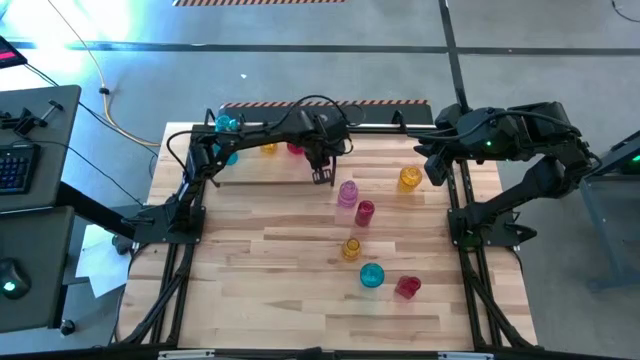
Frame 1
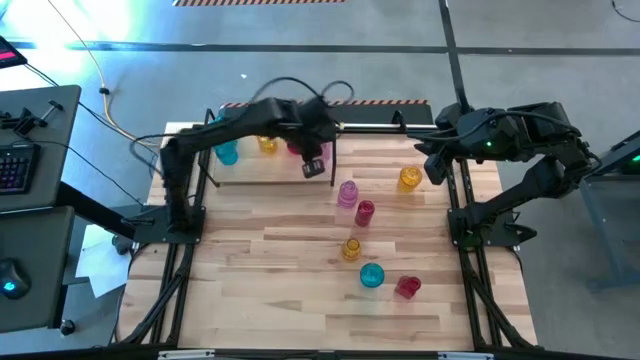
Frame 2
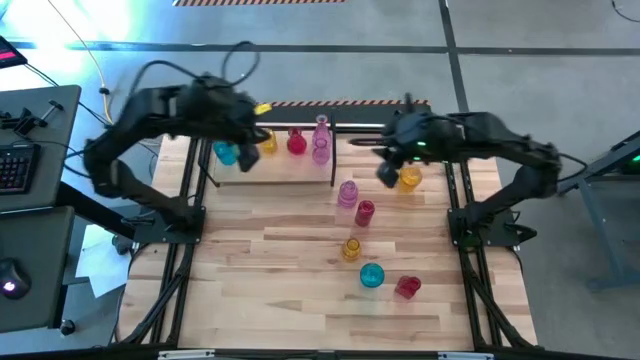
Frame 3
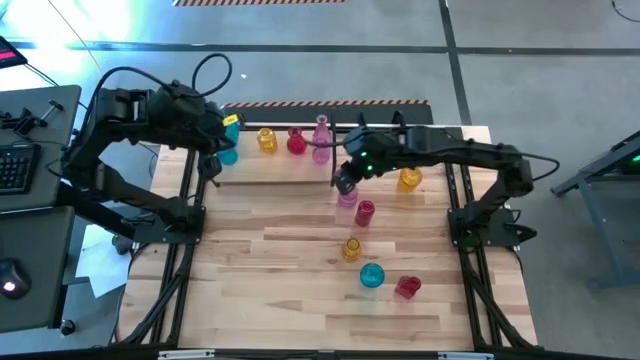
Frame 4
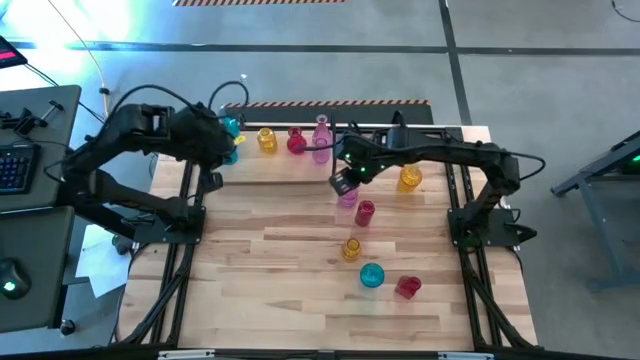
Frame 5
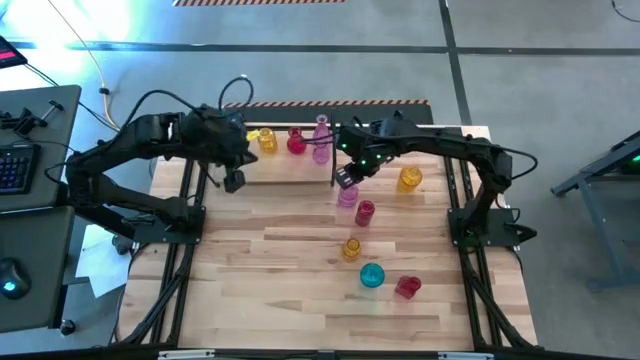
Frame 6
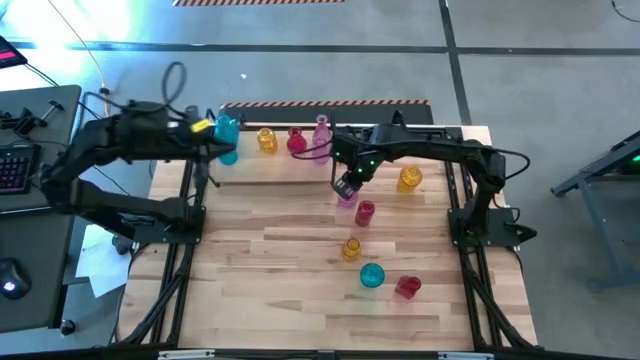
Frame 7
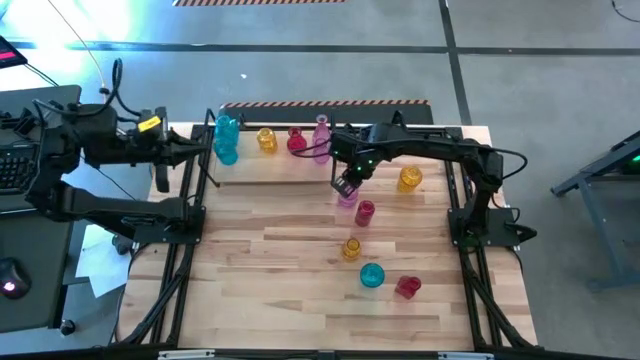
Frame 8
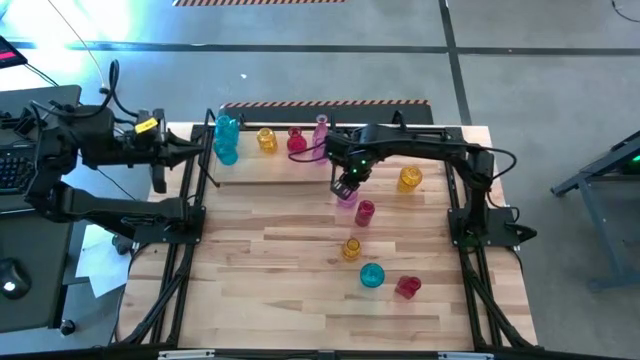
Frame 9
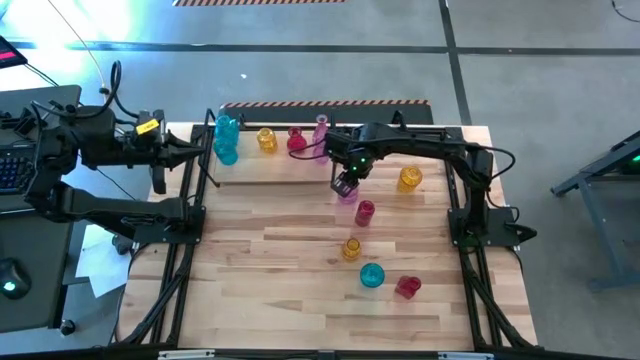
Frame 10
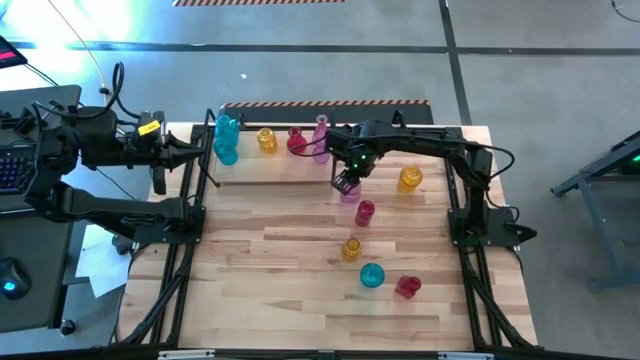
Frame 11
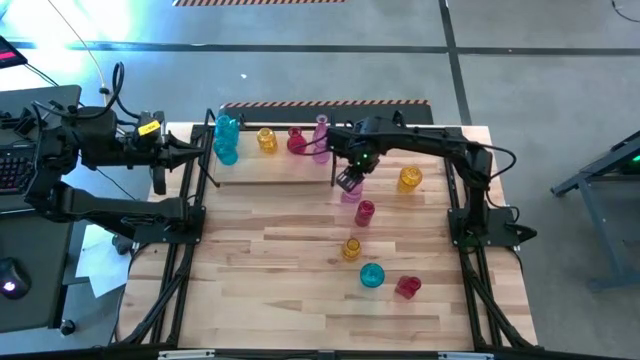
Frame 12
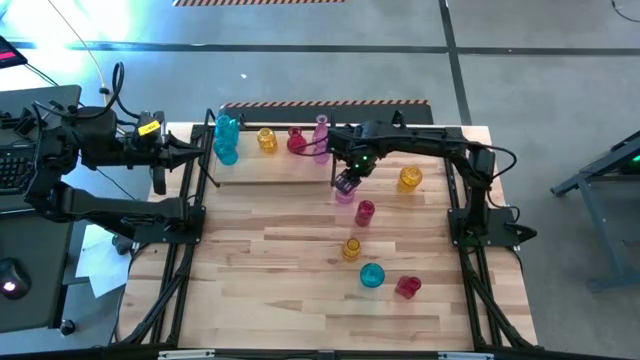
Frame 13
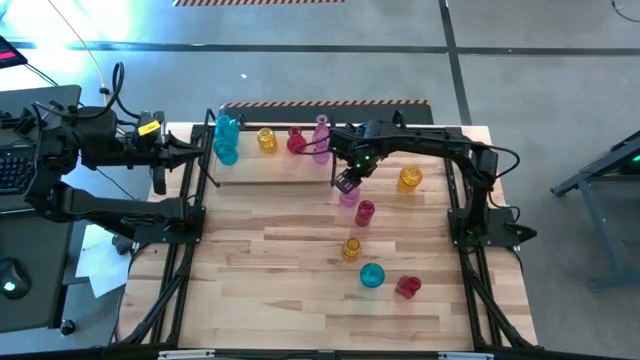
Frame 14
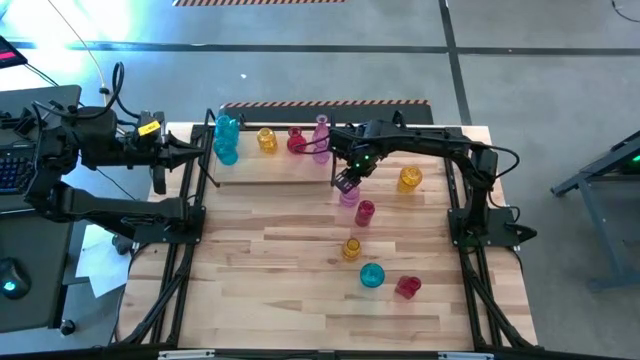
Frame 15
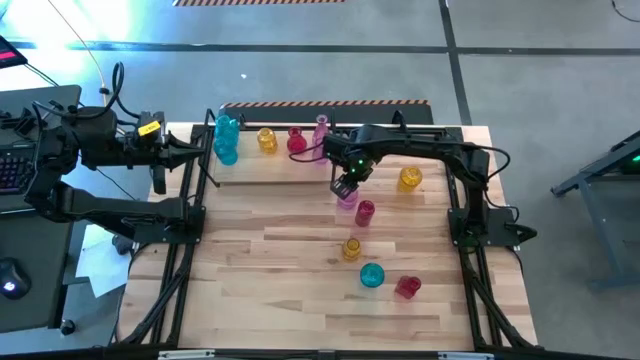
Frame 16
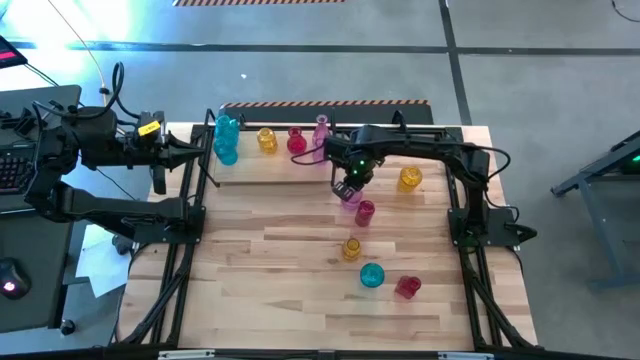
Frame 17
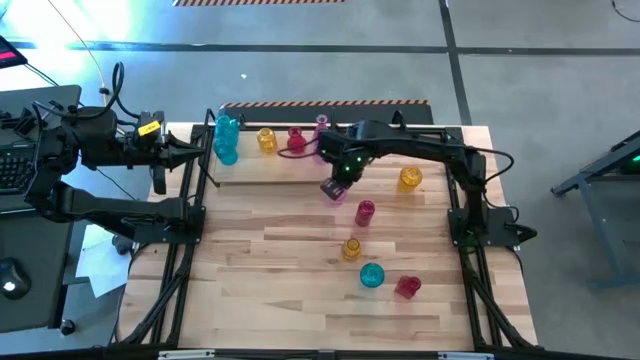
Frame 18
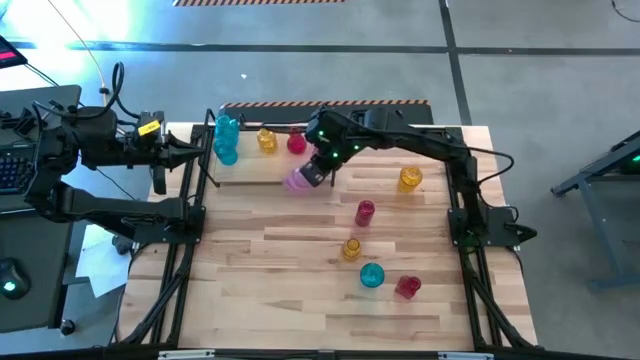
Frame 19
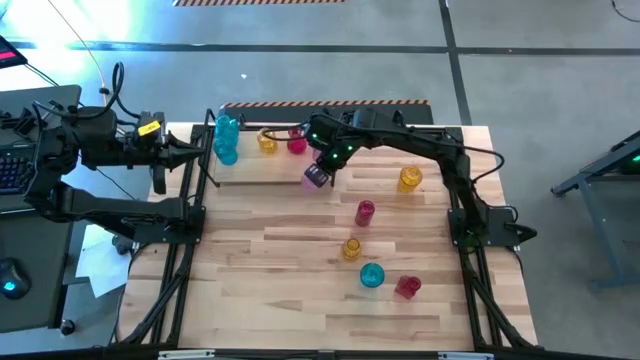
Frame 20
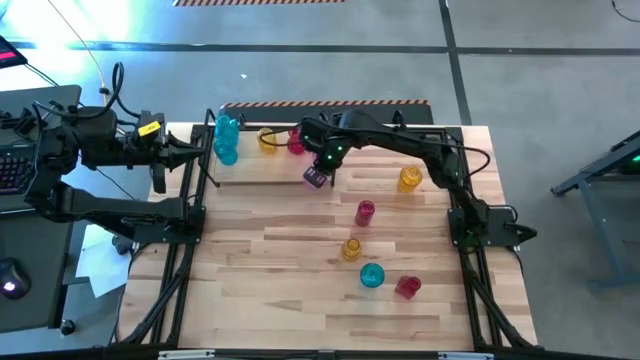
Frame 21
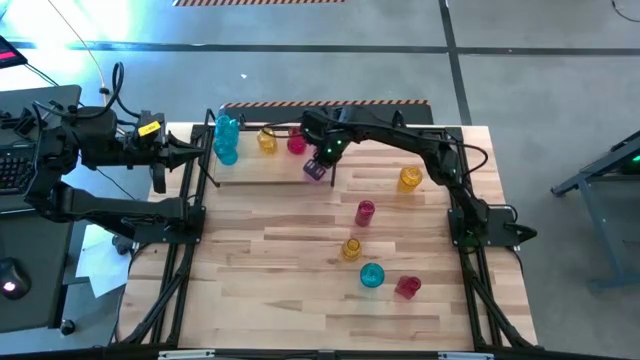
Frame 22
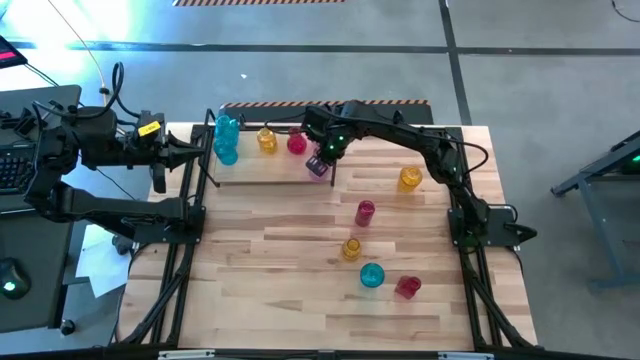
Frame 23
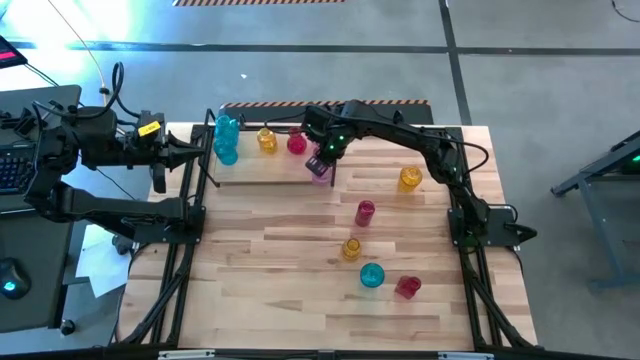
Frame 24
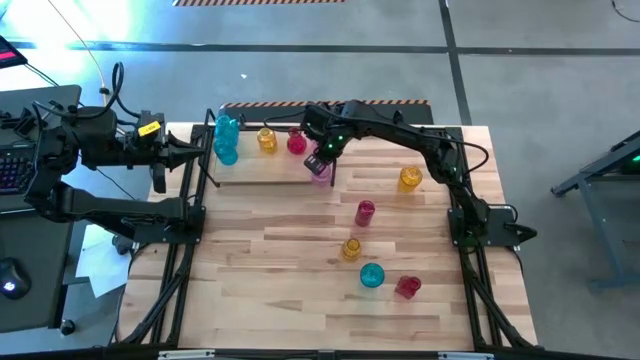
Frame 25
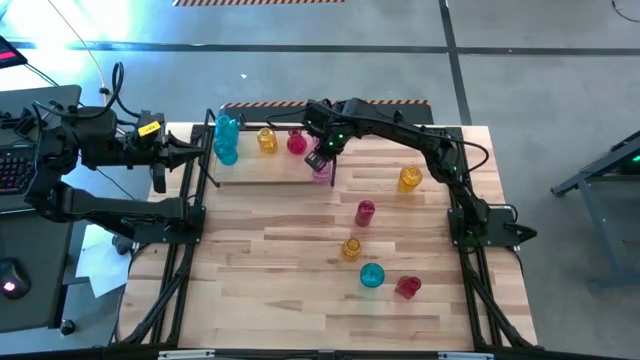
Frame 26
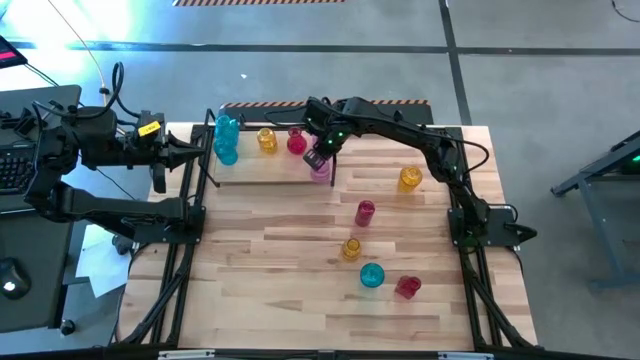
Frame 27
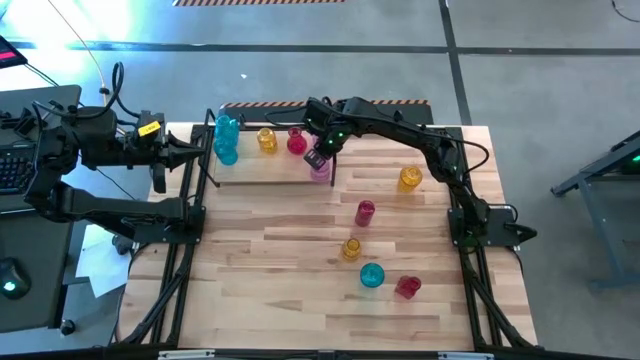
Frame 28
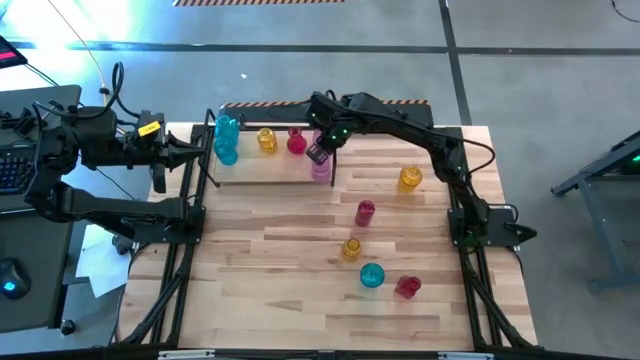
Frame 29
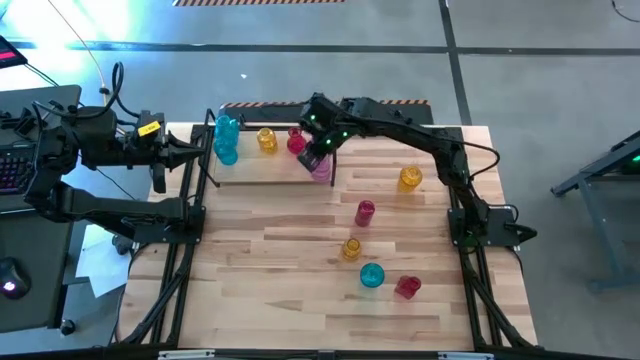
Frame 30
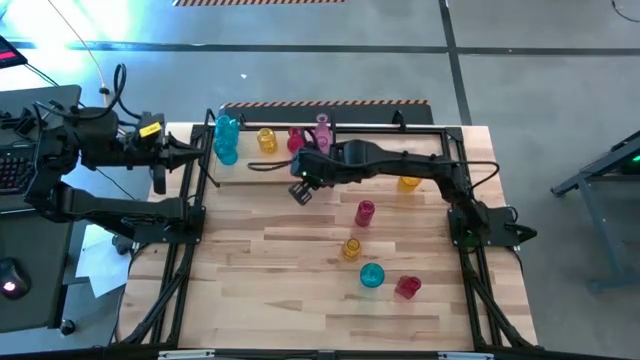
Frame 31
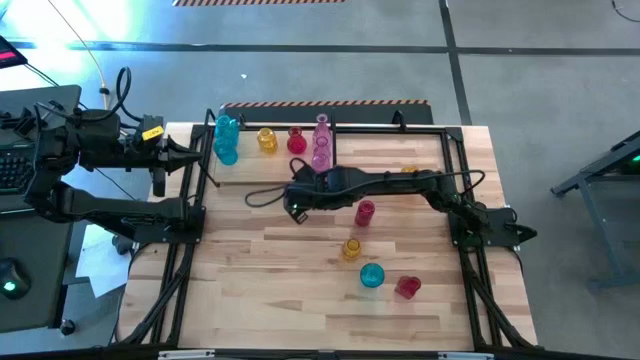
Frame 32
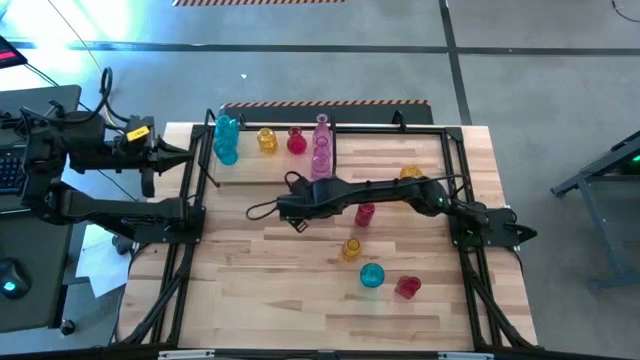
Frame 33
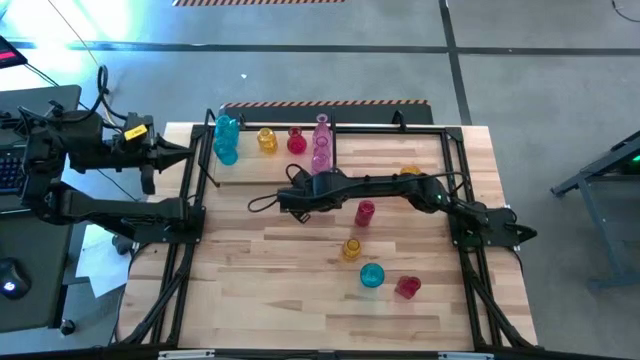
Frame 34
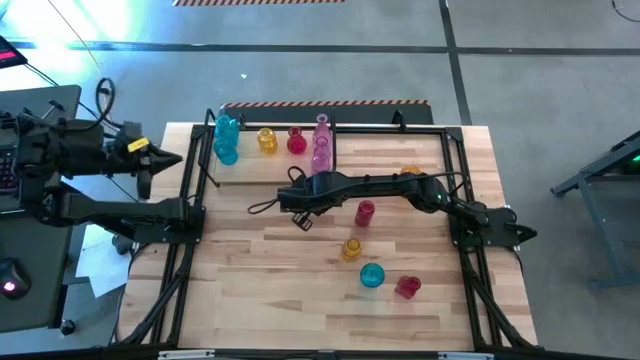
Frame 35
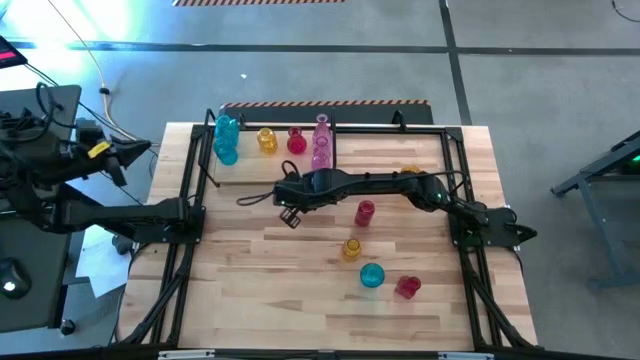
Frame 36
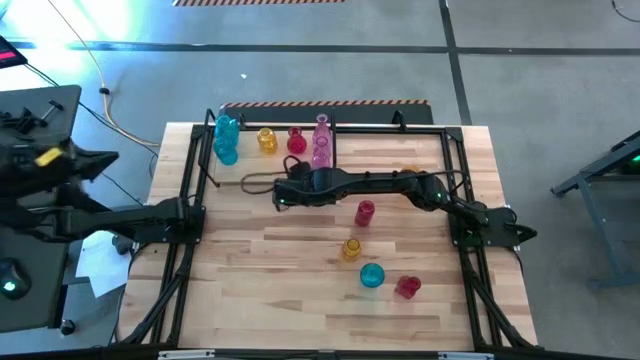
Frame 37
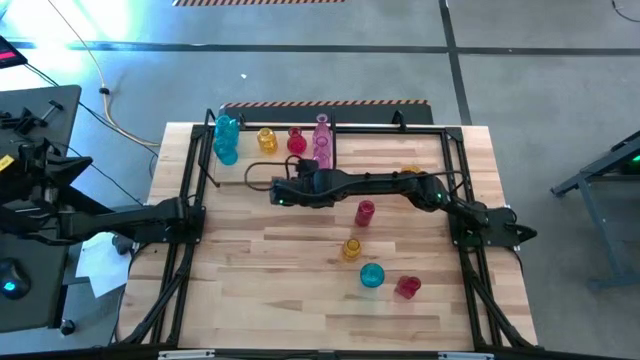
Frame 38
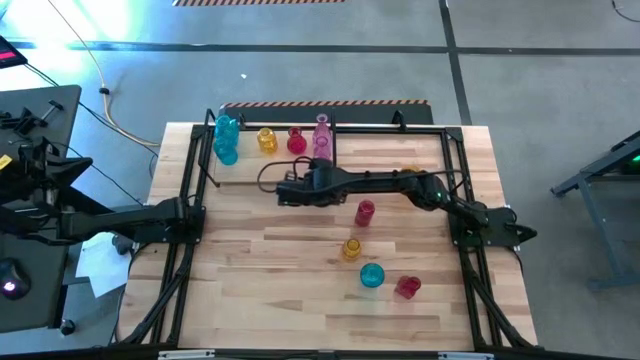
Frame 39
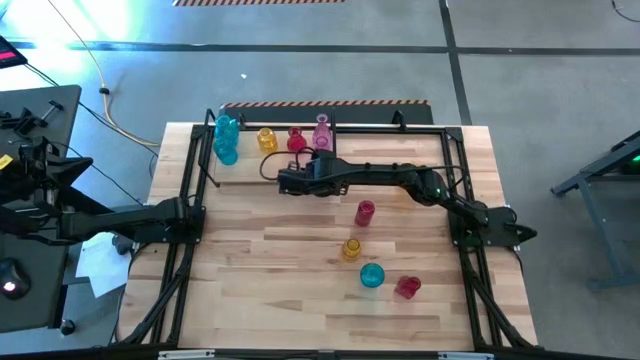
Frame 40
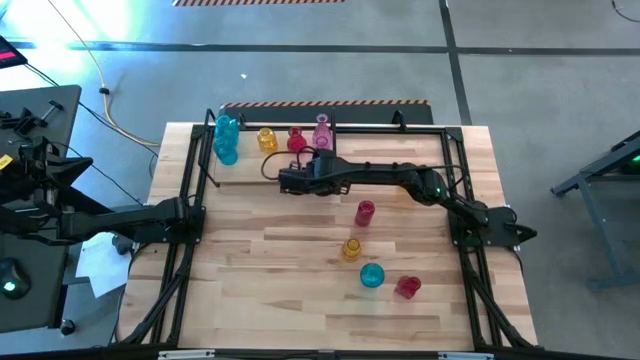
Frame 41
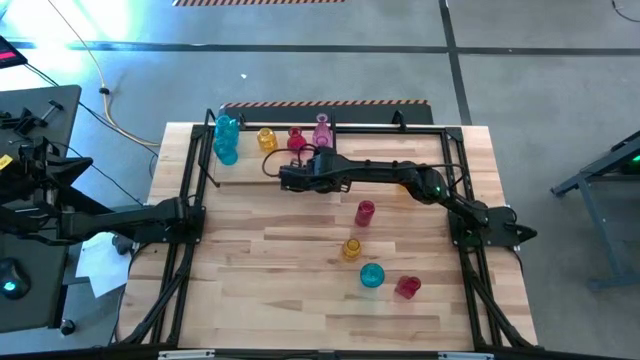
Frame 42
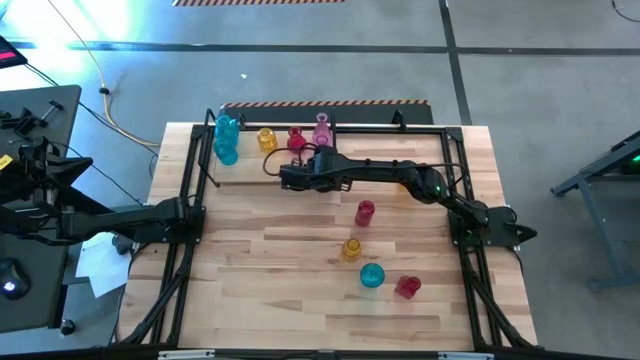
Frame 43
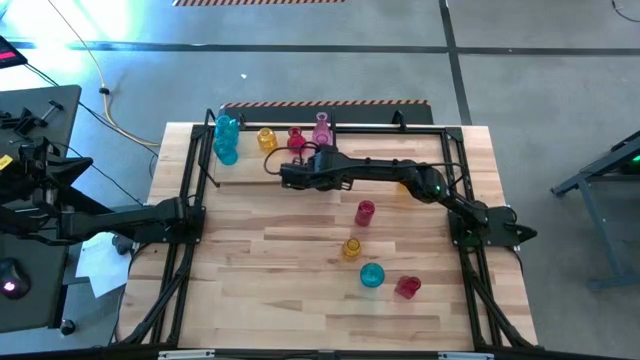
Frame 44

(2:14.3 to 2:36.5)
Task: sort vases onto shelf
Put the purple vase on the shelf aligned with the other purple vase
